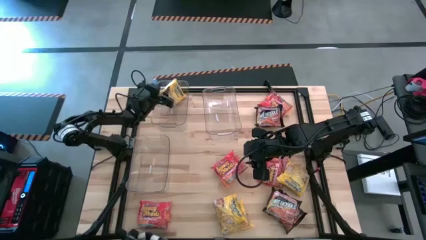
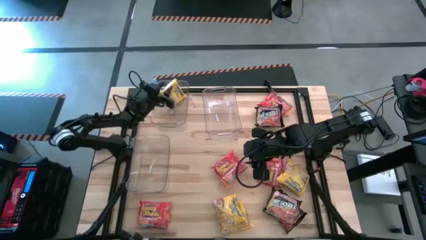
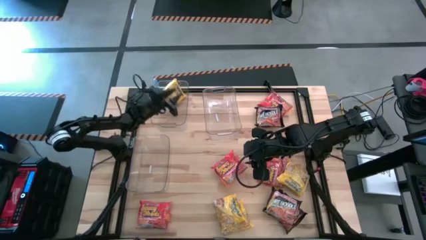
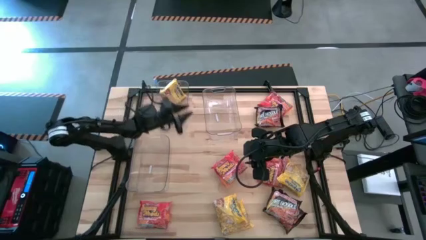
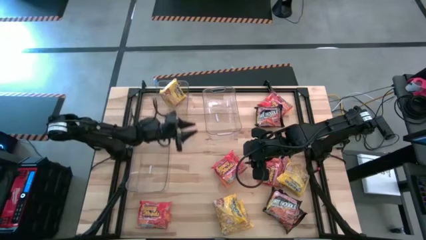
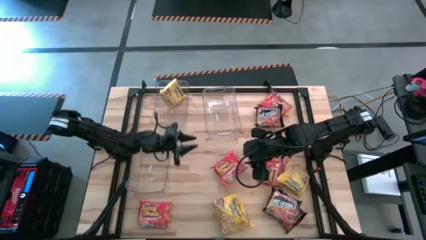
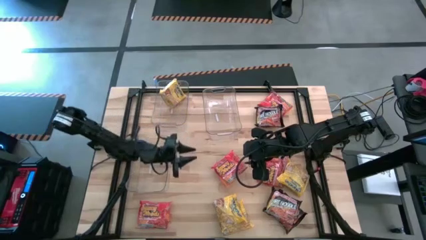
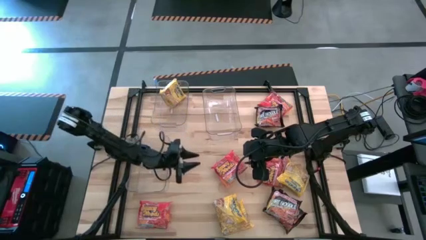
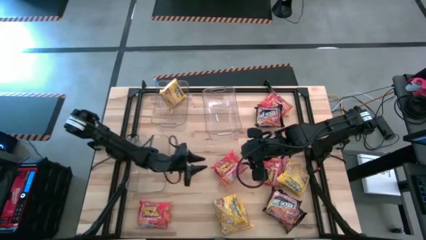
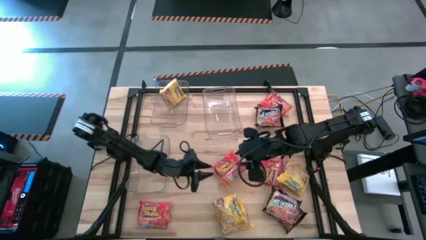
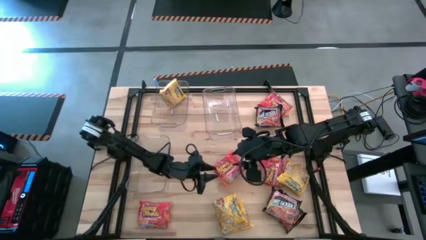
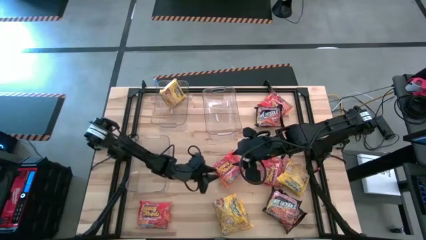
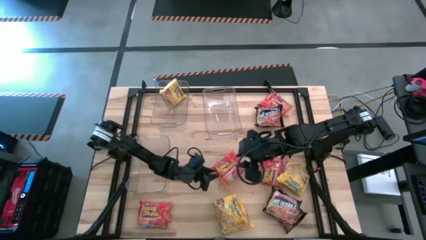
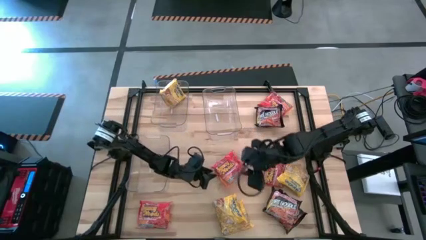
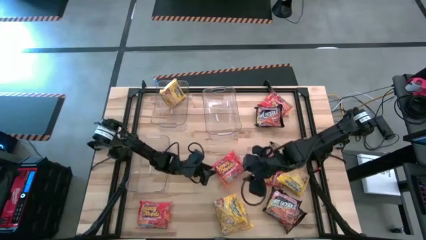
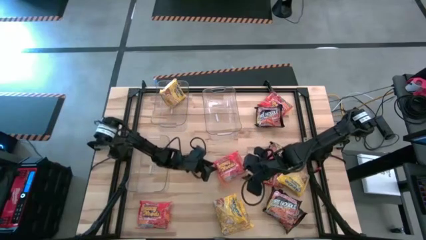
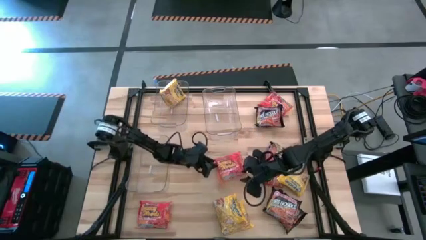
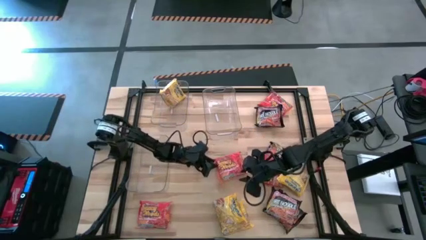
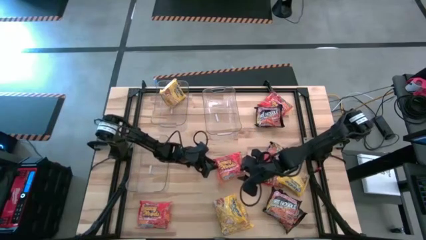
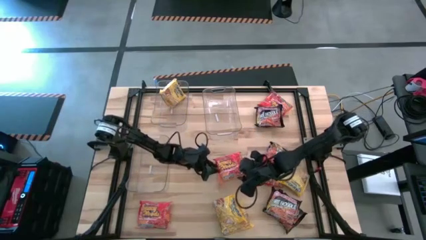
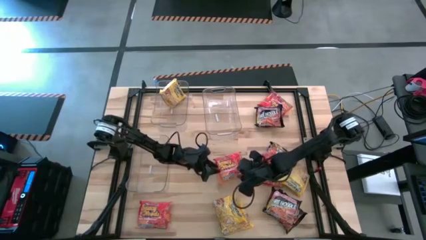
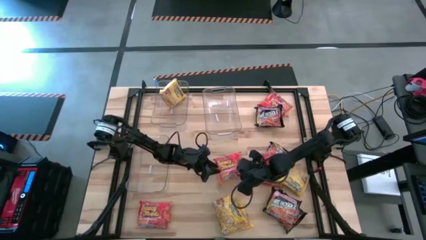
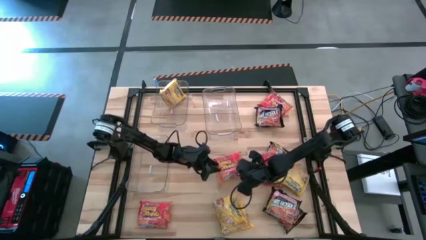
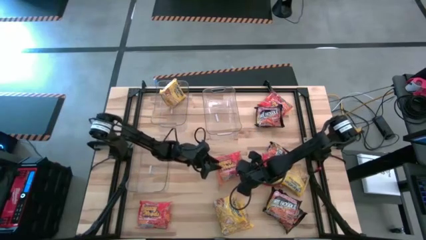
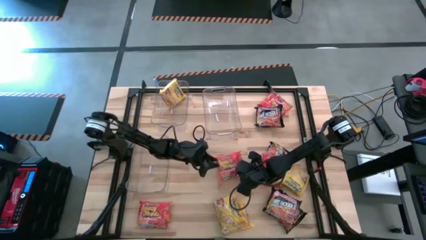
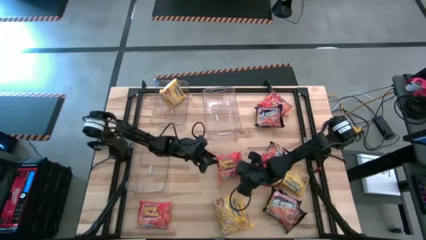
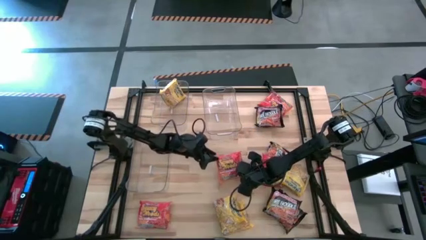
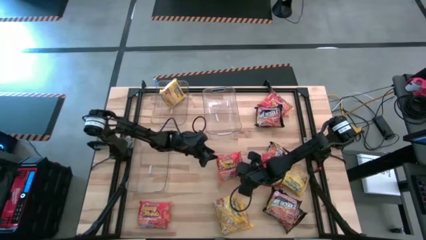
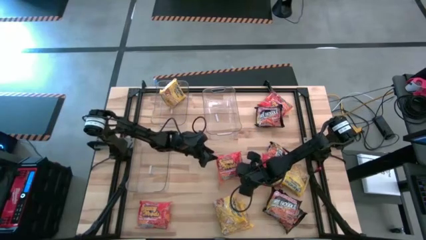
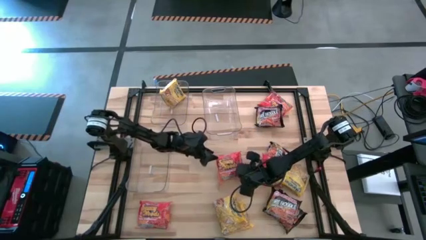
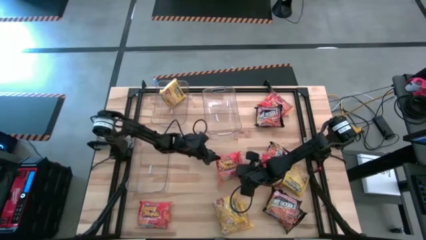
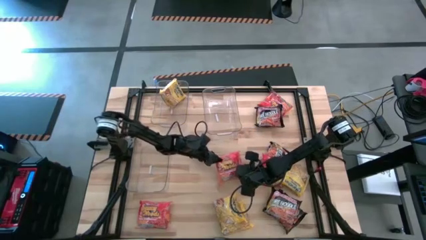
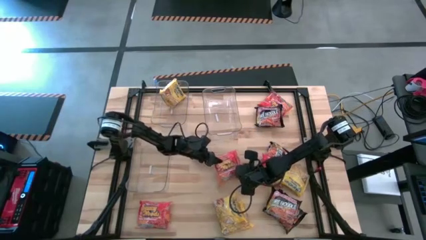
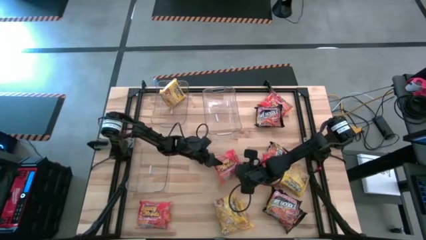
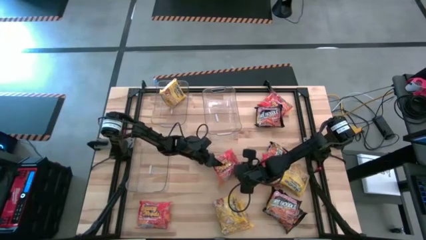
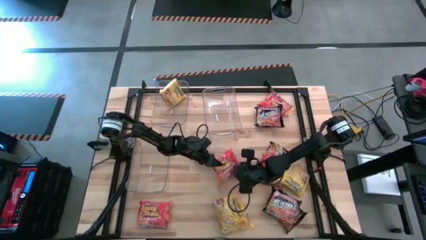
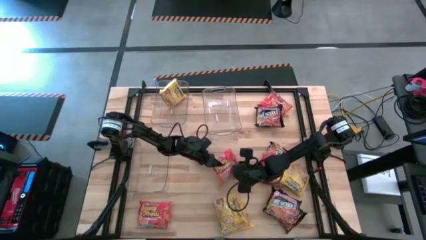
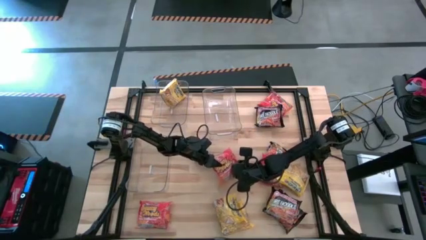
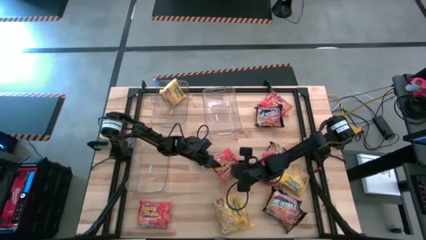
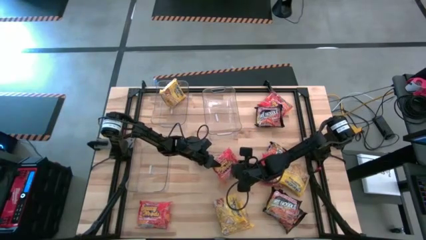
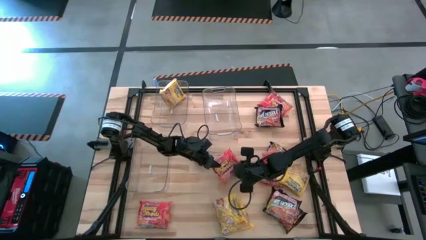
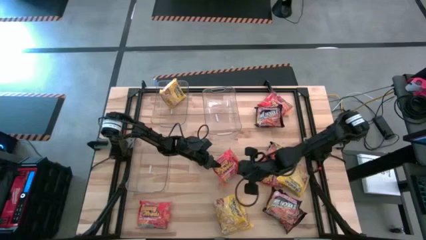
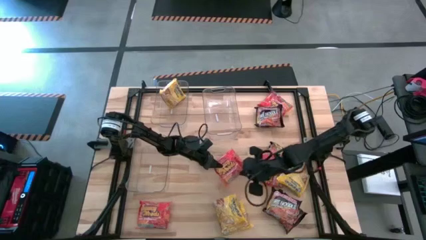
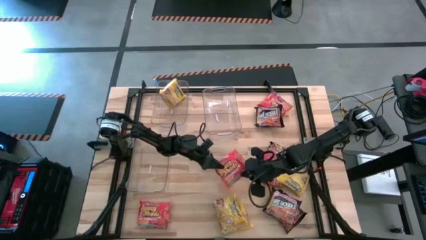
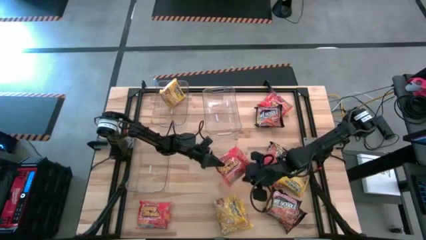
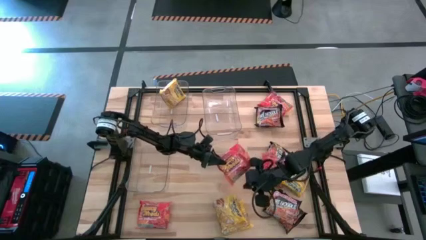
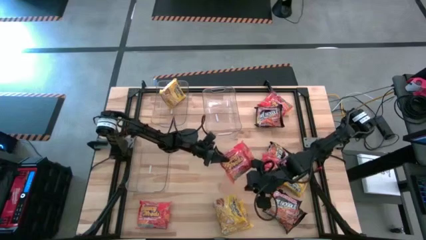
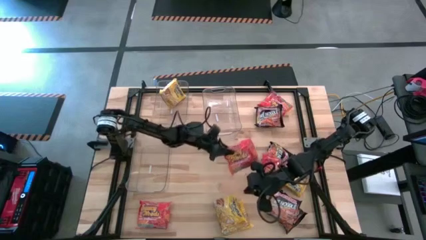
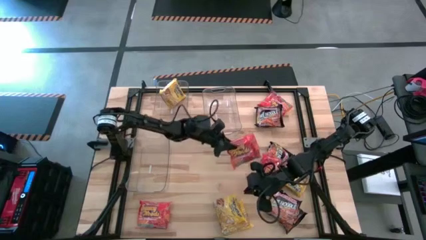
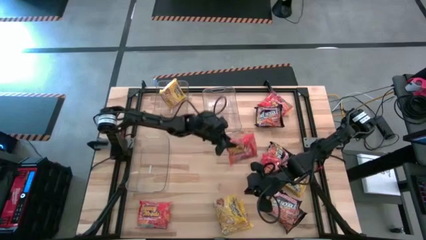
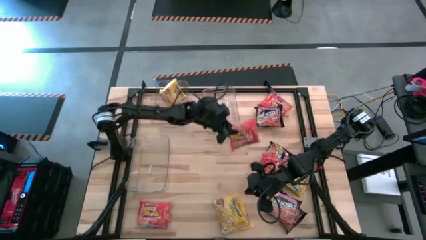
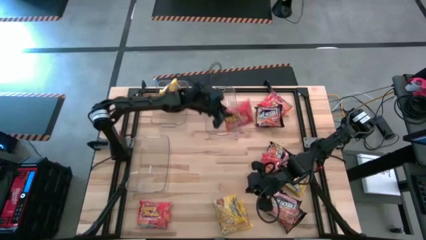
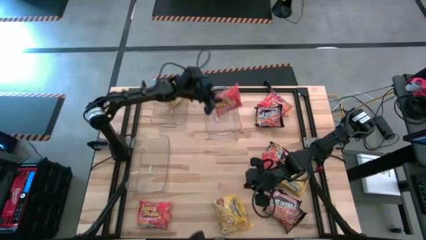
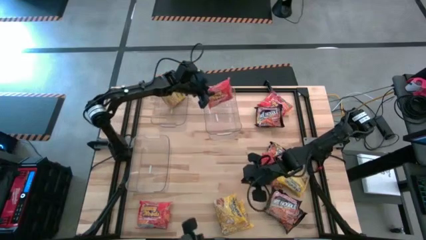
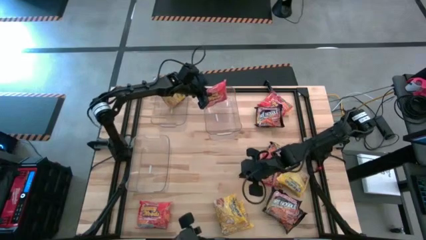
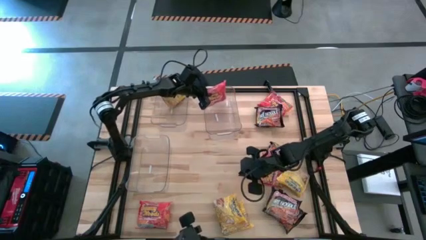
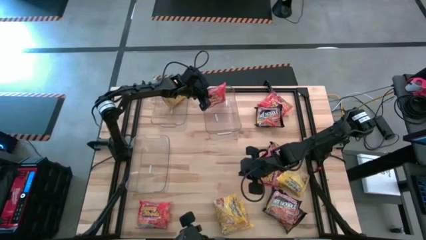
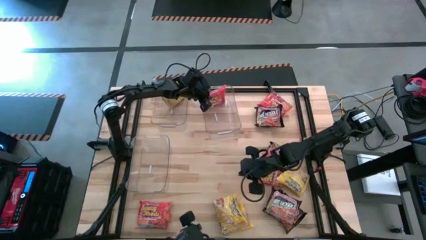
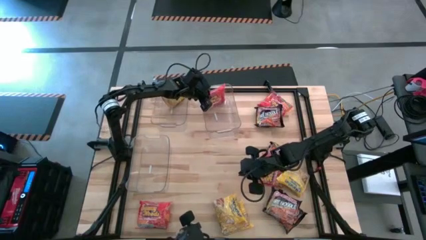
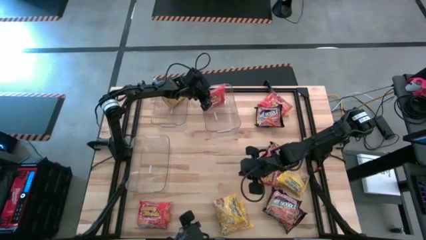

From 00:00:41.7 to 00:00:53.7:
Task: Sort Maruchan noodles
Put the orange noodle pack into the top right transparent bin
